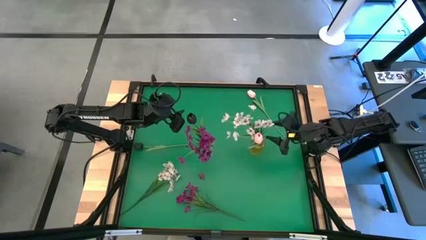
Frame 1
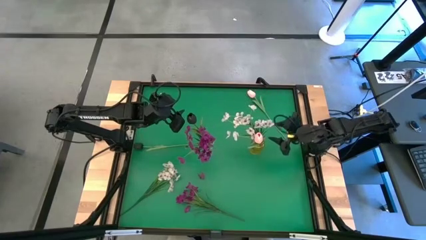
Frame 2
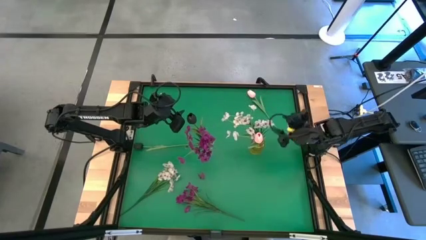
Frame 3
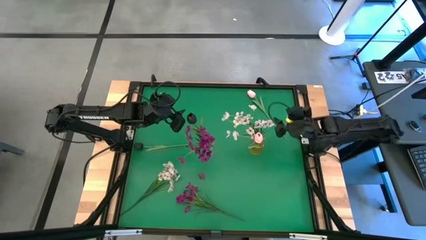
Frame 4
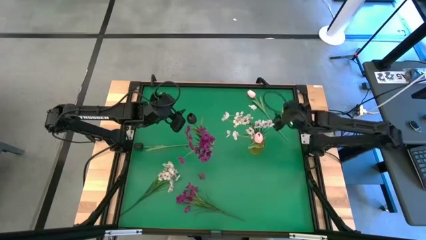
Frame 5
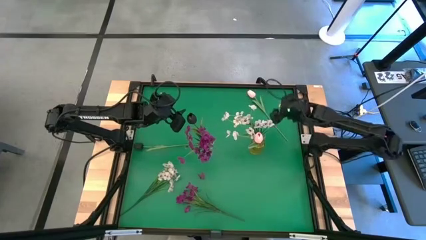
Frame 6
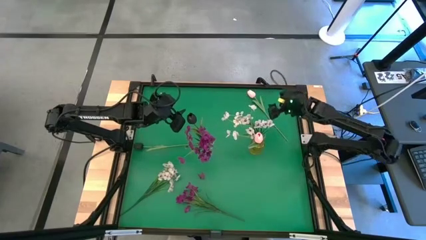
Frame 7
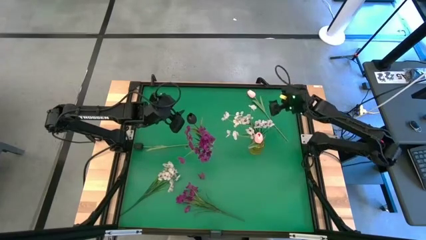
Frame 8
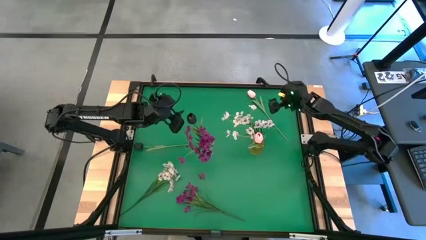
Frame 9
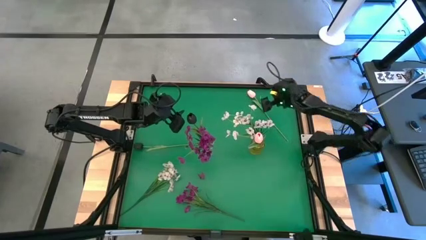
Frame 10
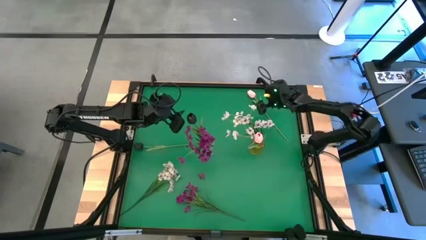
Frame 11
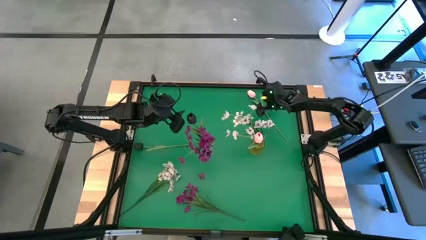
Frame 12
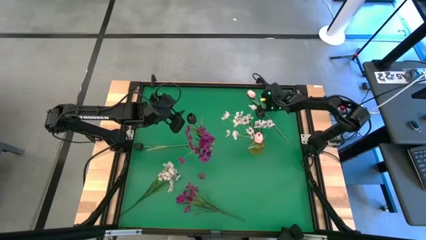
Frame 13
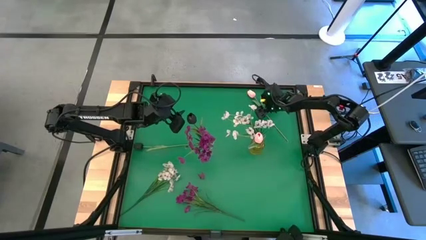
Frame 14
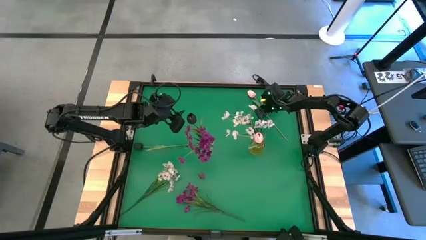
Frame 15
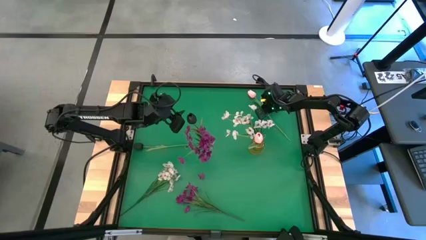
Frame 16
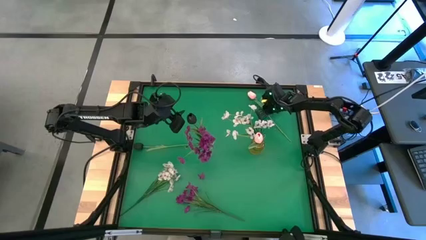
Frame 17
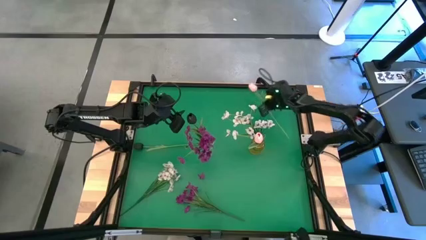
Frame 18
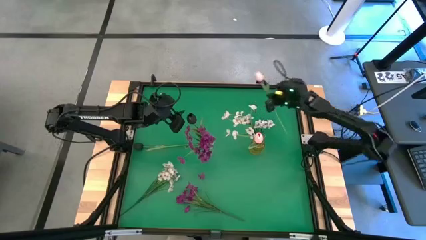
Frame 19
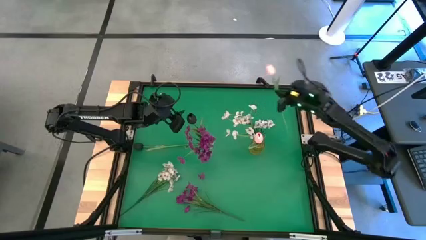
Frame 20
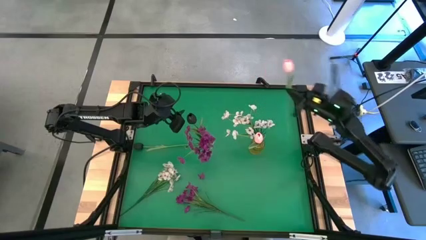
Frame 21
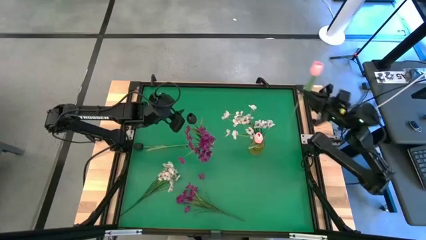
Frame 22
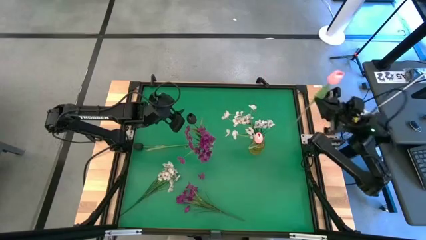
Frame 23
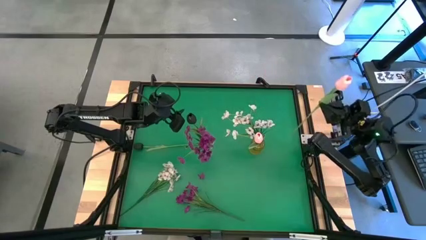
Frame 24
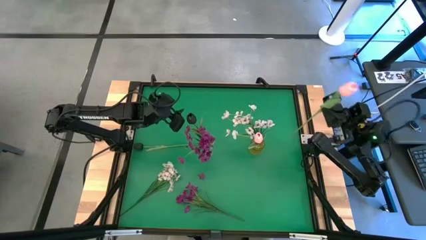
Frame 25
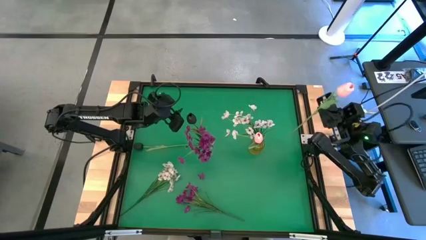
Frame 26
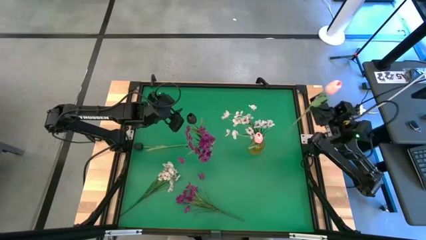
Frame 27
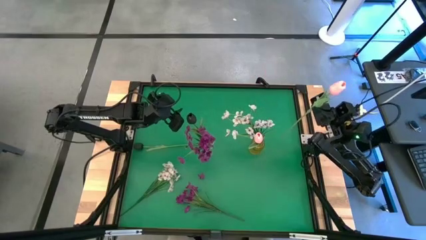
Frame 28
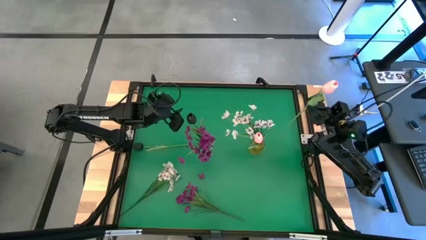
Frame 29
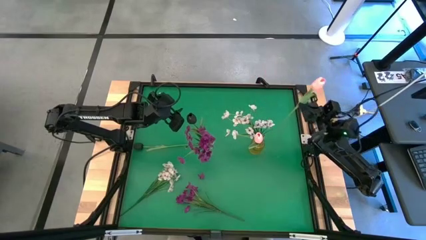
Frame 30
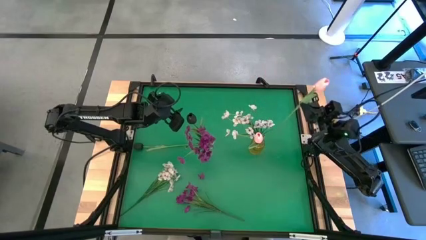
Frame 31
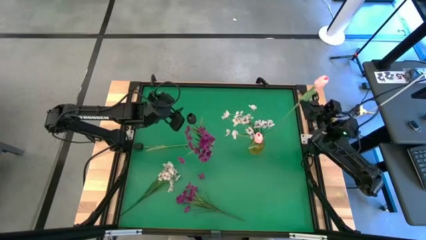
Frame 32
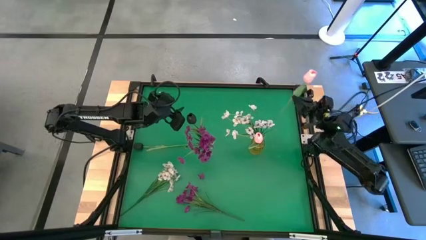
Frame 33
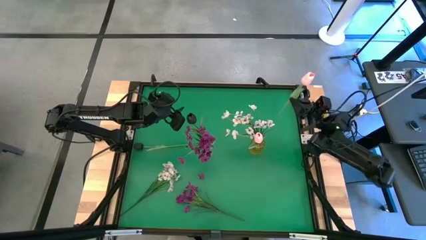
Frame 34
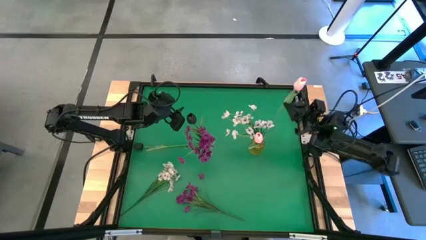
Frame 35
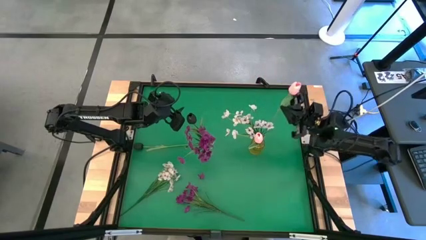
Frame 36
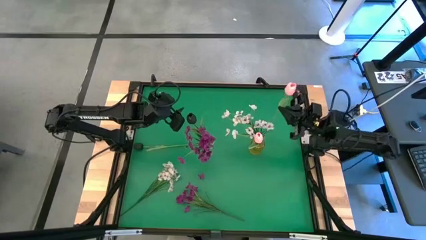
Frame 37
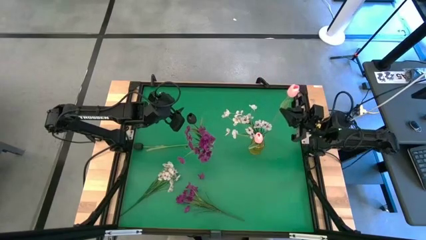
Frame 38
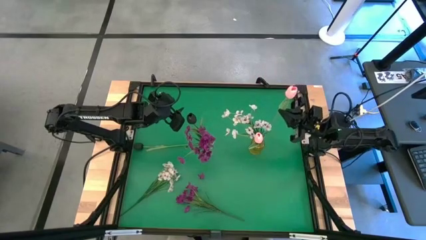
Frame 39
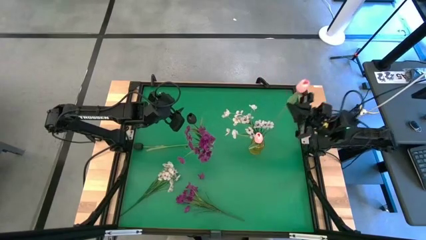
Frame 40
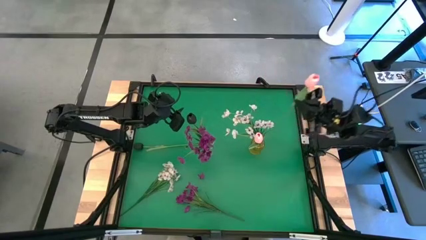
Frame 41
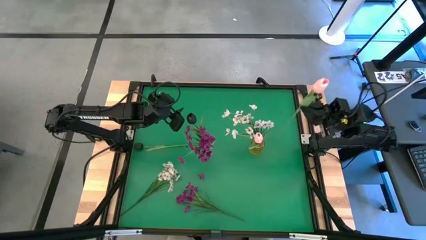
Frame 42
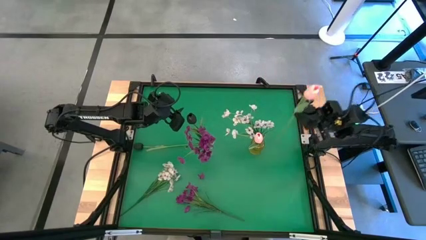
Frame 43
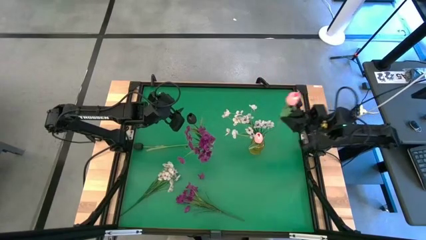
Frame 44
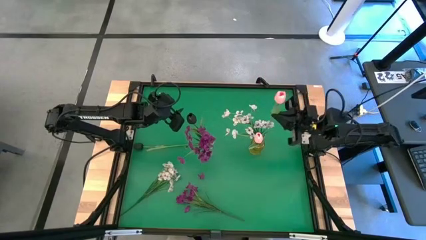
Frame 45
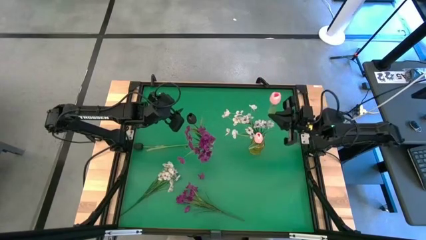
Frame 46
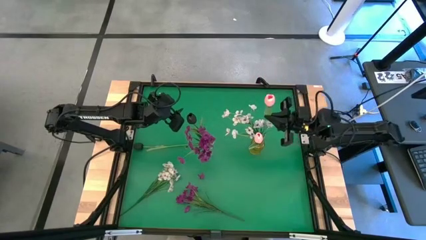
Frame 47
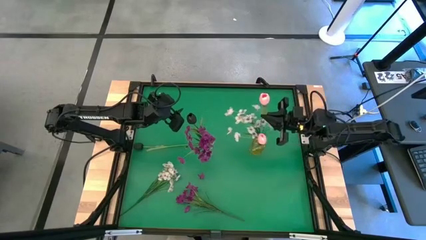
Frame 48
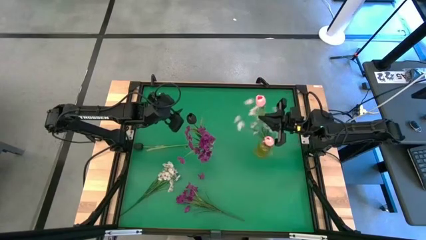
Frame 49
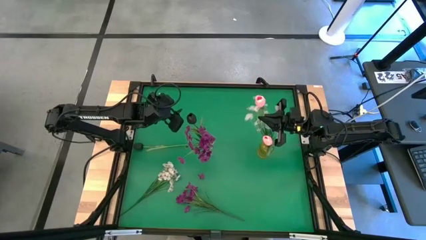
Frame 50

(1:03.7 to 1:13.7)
Task: Sort flowers into vase by color
Put the pink tulip into the yellow vase
